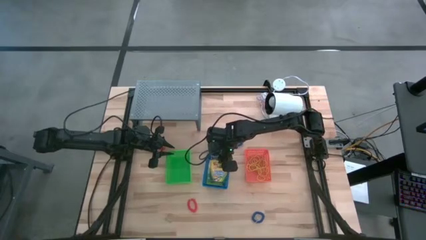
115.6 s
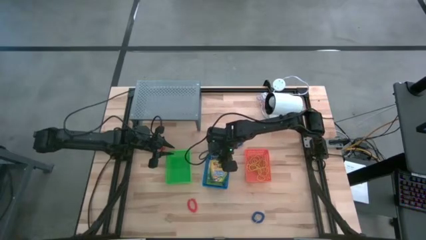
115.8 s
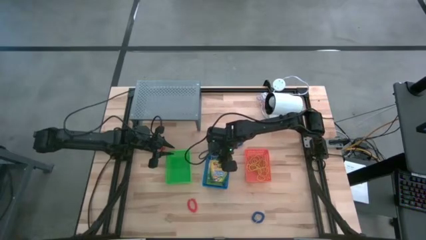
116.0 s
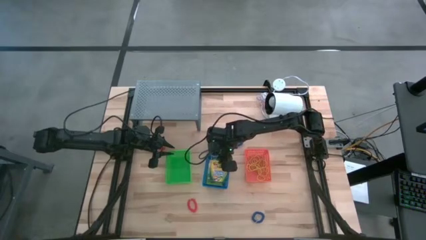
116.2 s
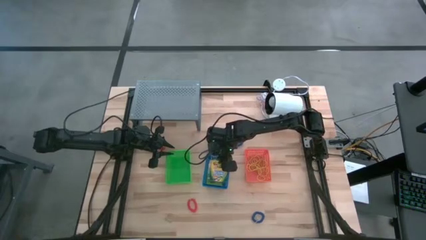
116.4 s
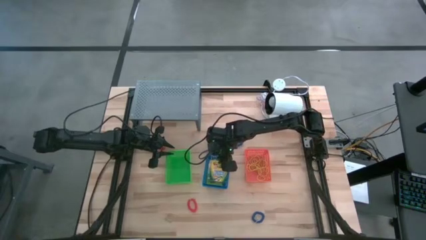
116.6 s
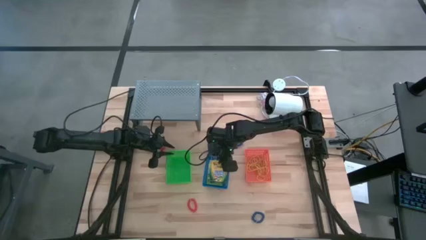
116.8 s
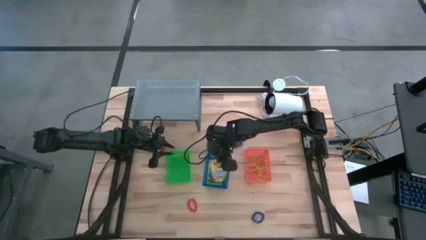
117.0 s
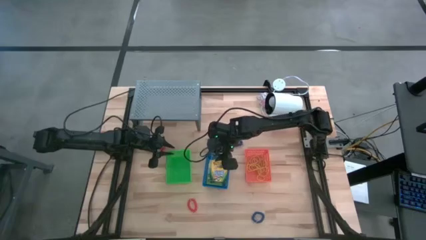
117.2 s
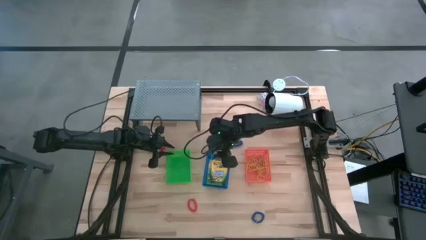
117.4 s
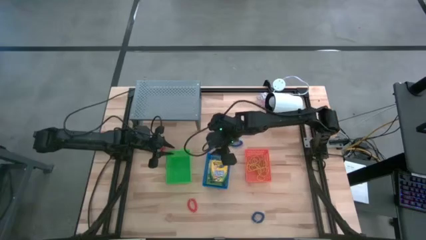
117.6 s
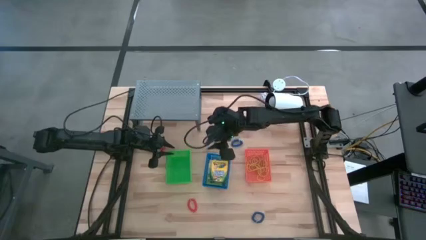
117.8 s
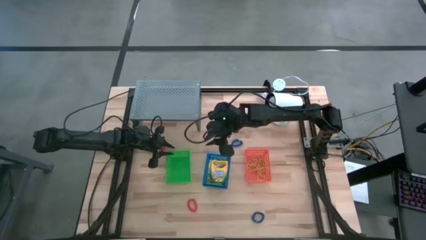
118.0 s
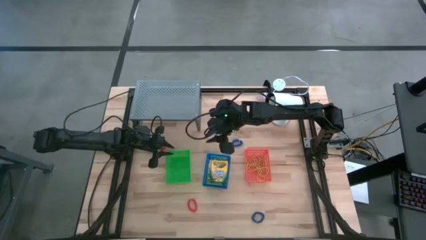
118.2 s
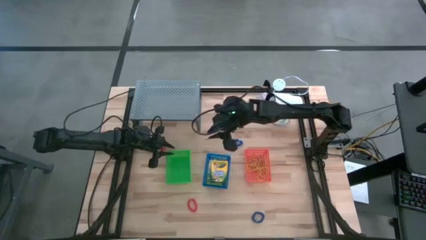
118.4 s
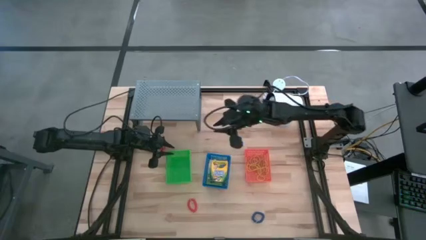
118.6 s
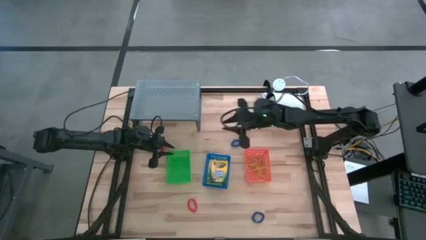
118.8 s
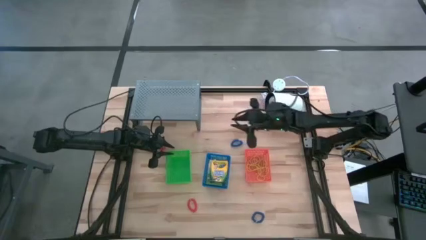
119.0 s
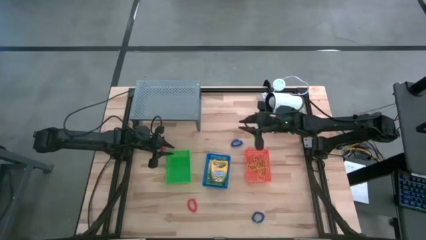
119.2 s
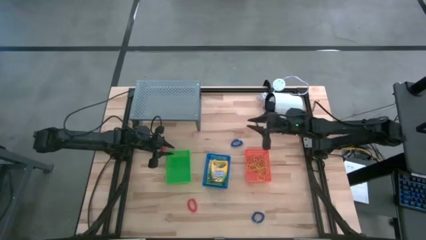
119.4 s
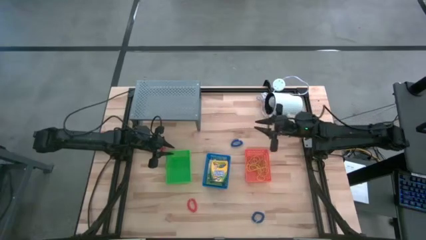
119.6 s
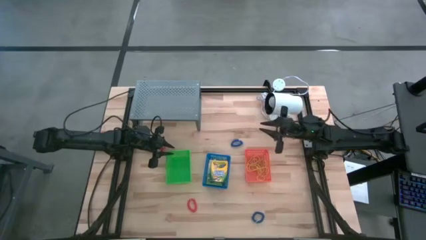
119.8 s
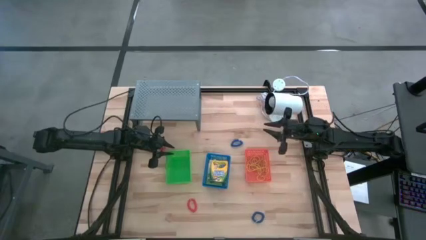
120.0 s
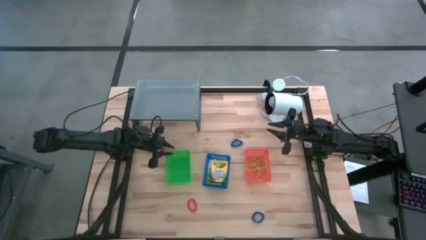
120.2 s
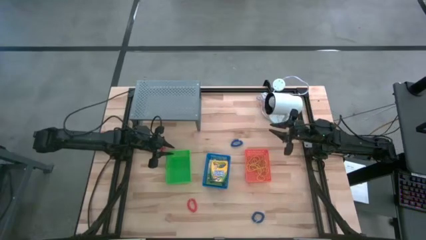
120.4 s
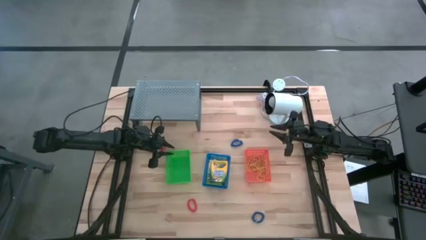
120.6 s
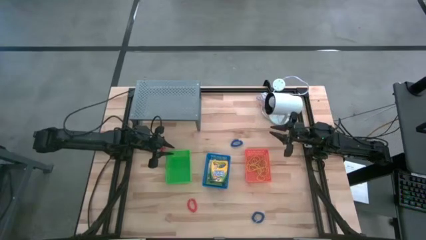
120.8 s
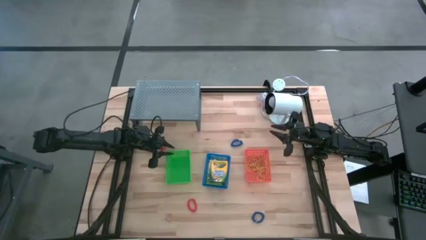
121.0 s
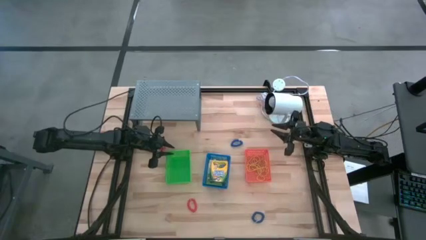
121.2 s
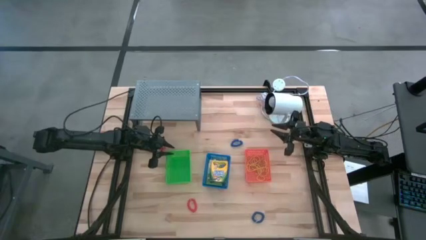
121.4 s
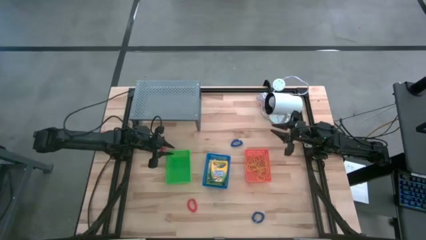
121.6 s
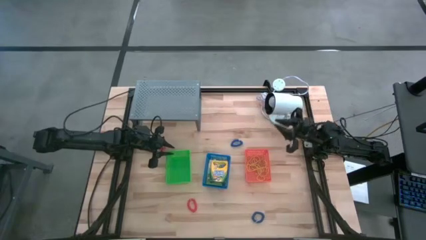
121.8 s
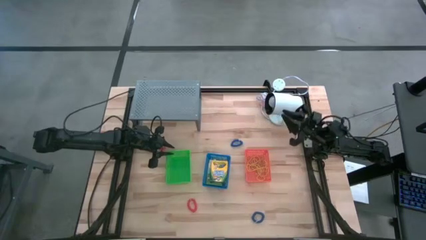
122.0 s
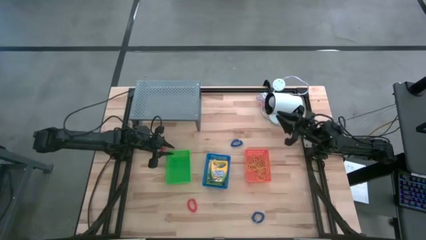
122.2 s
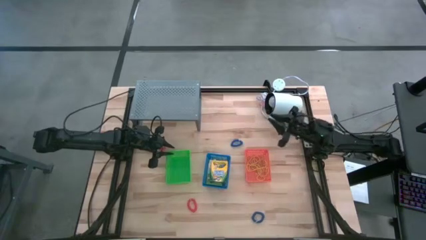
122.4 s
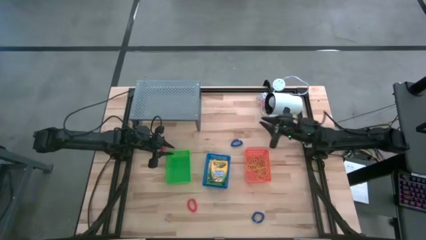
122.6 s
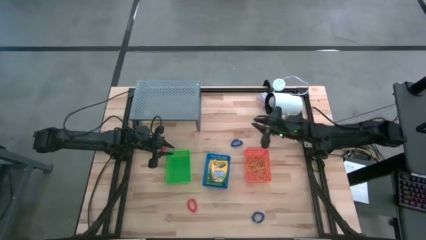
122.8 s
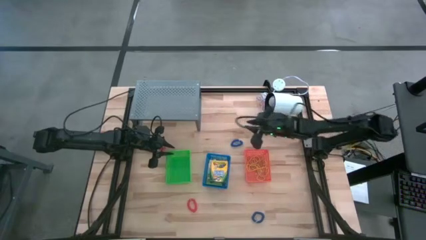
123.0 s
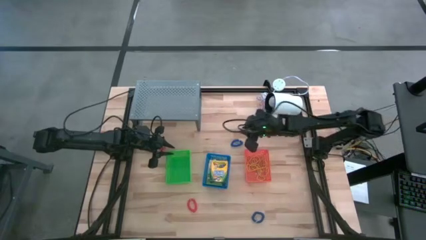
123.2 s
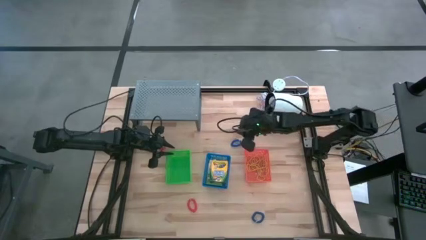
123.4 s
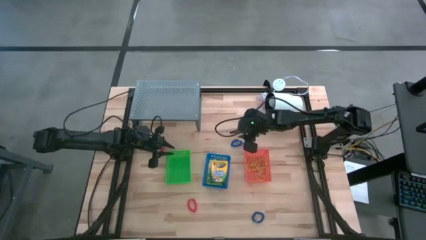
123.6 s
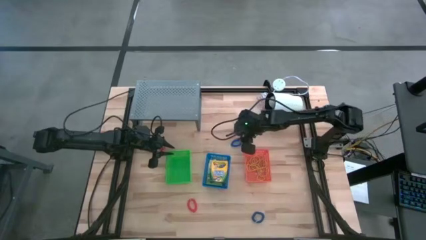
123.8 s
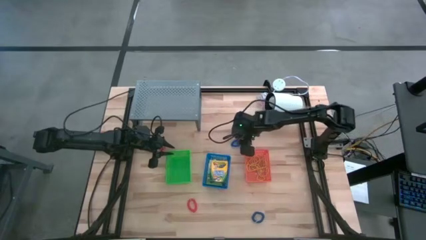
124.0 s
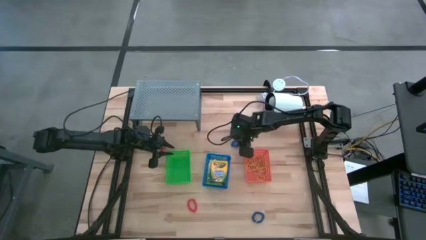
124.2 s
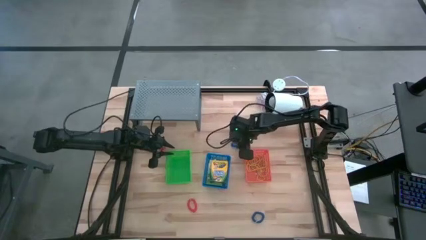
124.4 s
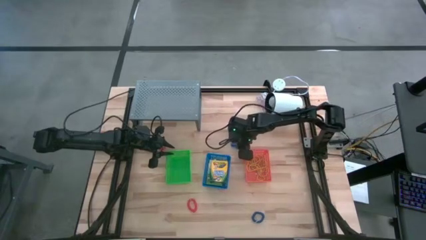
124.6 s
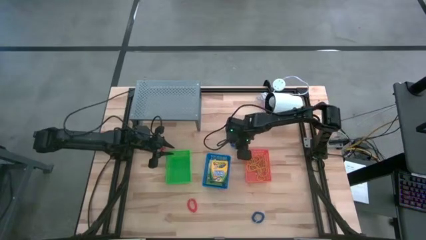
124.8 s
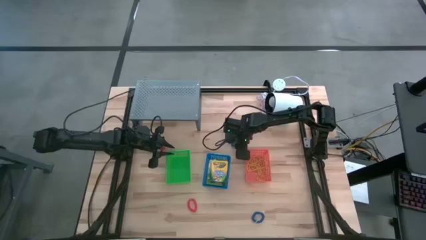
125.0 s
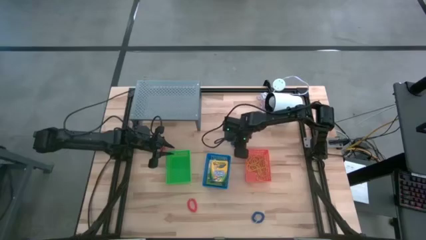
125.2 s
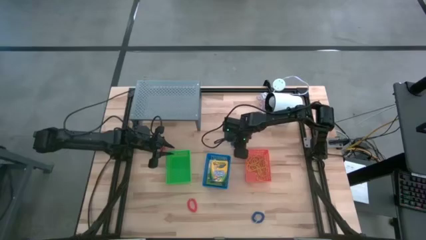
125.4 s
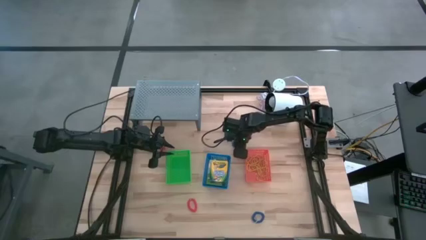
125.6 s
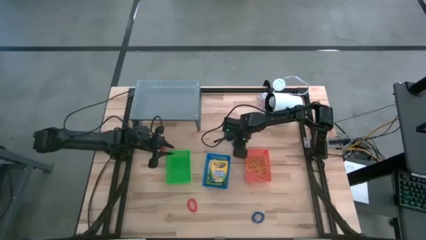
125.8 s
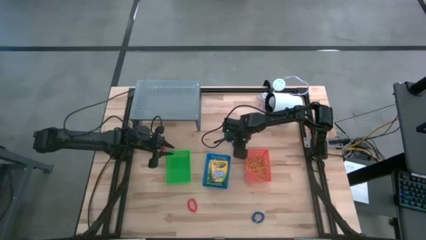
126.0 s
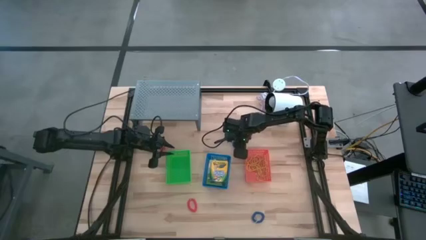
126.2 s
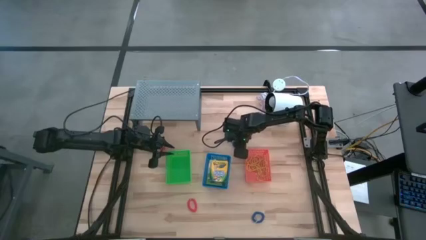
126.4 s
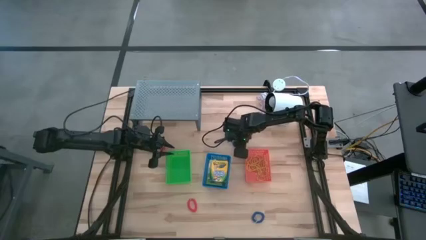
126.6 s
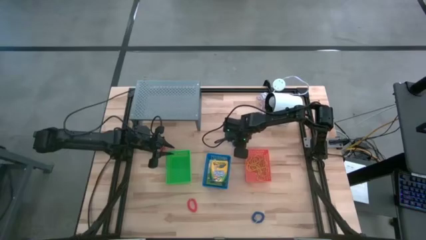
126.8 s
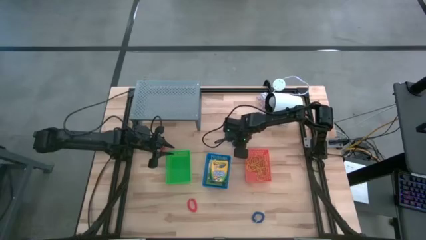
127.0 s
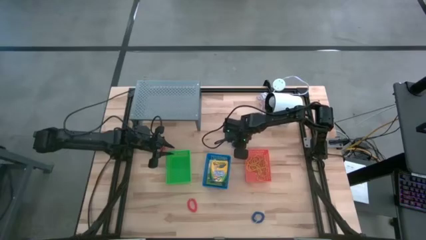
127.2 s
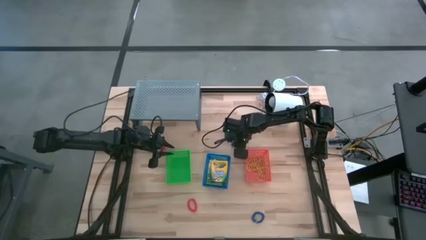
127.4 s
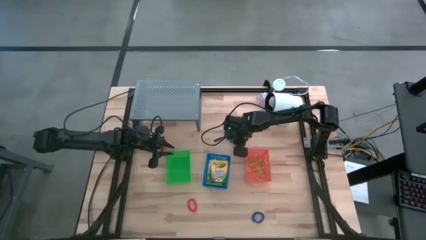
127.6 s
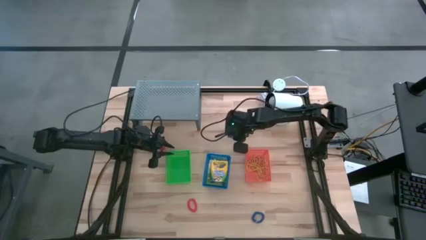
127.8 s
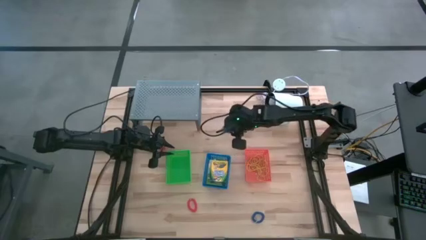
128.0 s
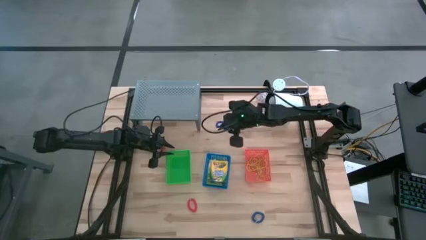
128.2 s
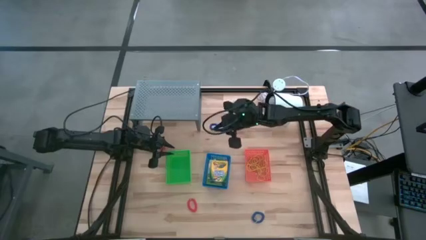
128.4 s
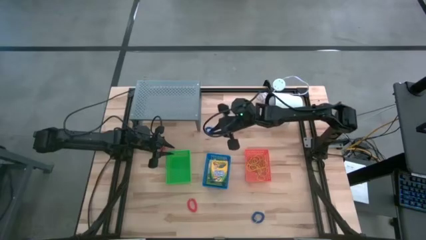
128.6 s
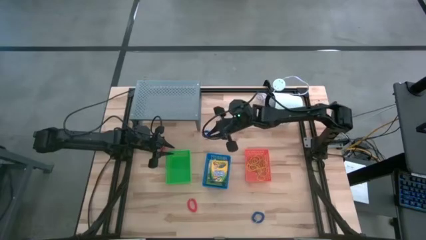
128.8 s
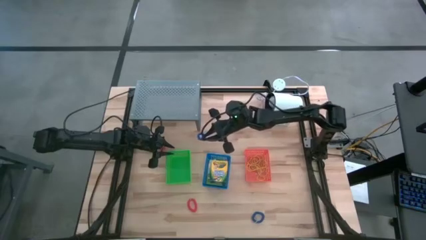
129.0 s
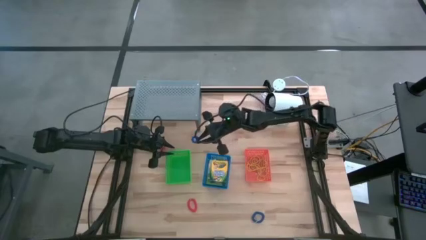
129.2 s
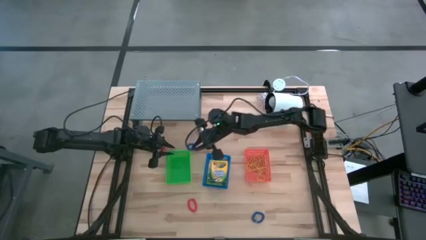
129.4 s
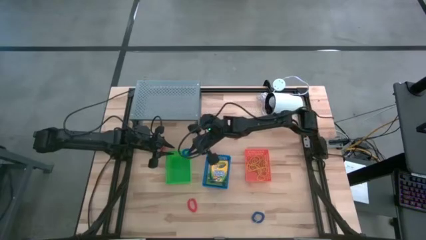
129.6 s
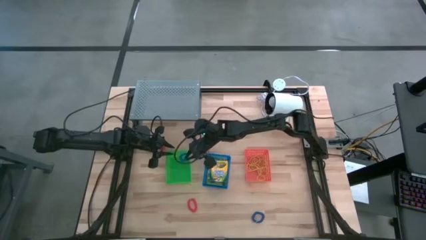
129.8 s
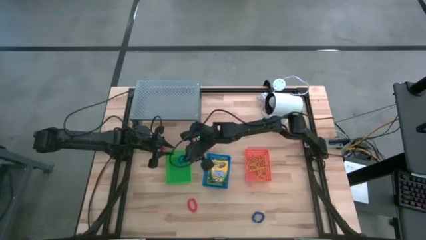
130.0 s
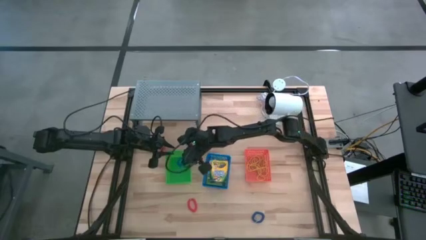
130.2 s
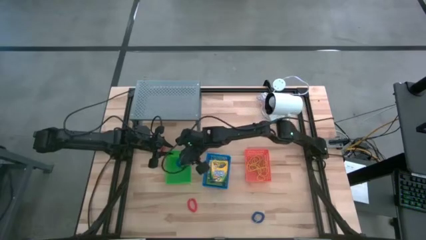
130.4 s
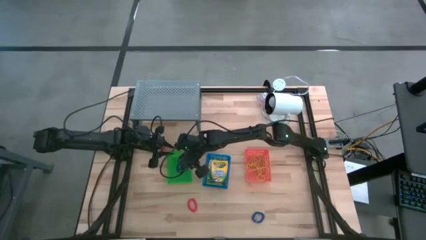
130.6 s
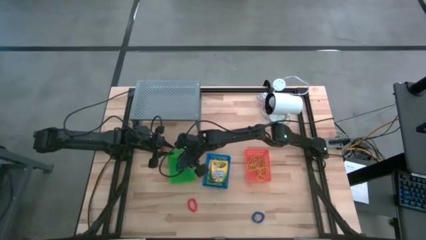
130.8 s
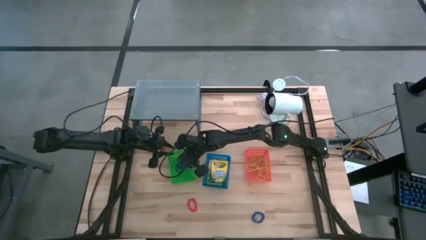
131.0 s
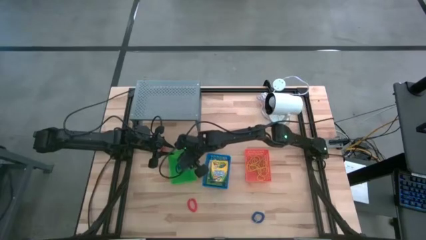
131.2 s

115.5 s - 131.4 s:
Task: Pick & Place Office Desk Supplies
Put the blue spring keychain into the green bin
